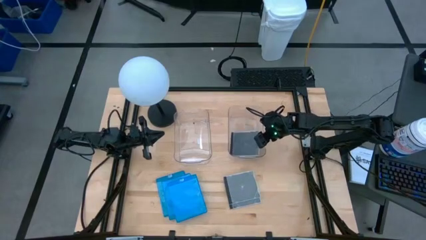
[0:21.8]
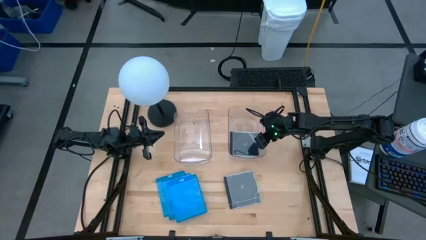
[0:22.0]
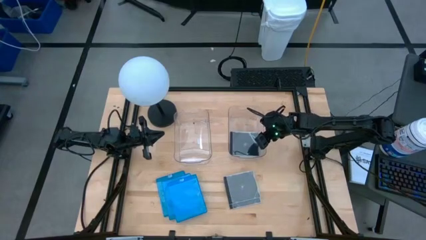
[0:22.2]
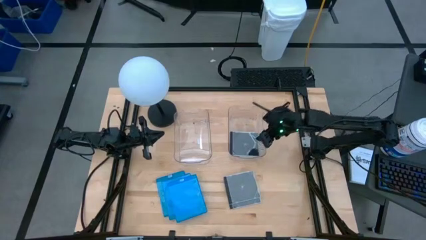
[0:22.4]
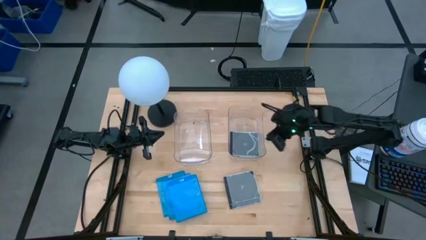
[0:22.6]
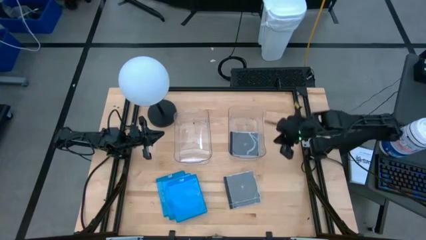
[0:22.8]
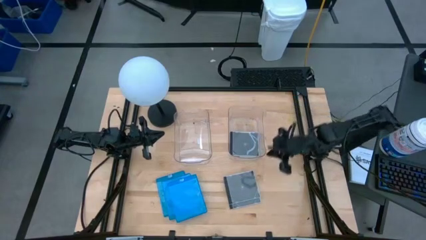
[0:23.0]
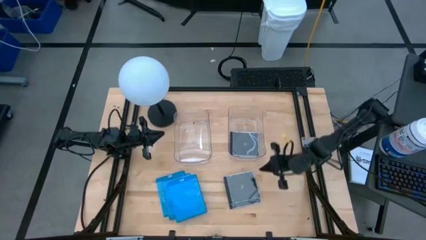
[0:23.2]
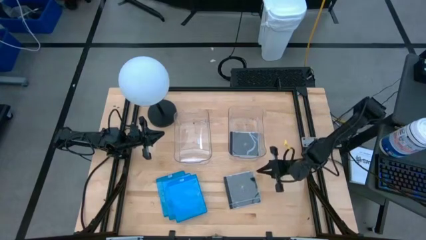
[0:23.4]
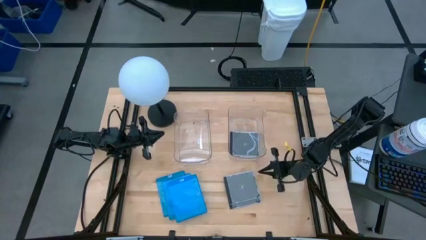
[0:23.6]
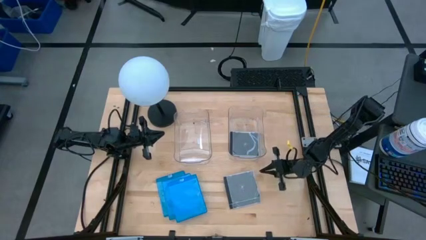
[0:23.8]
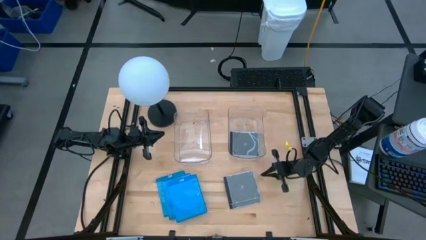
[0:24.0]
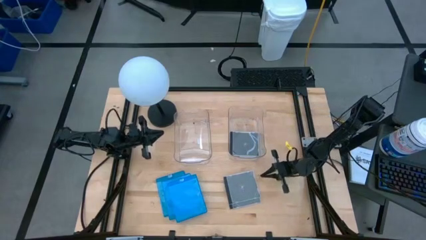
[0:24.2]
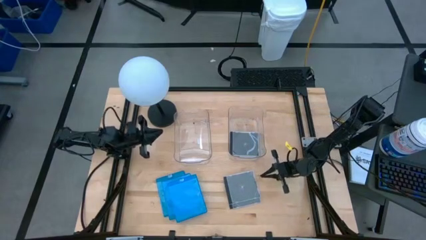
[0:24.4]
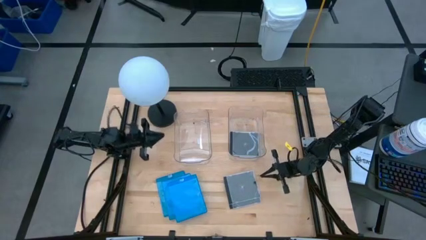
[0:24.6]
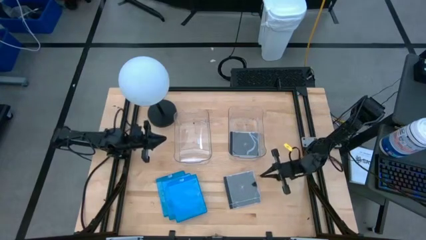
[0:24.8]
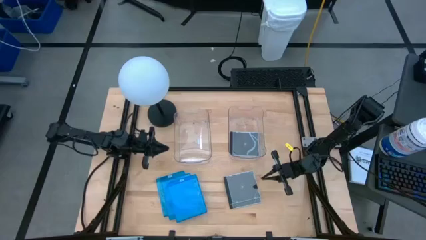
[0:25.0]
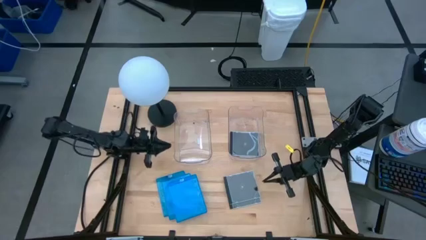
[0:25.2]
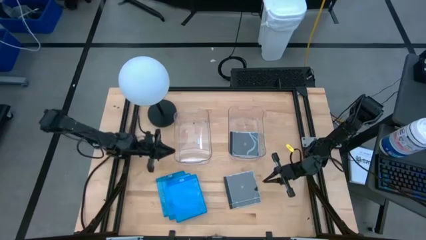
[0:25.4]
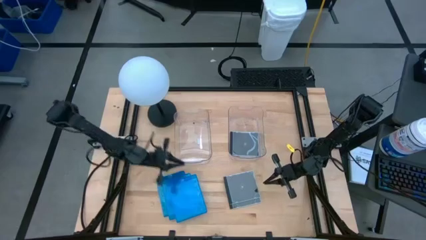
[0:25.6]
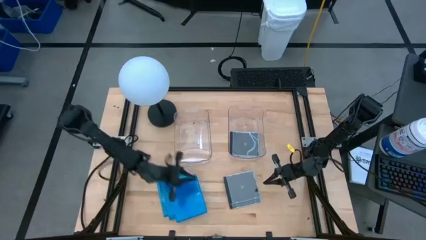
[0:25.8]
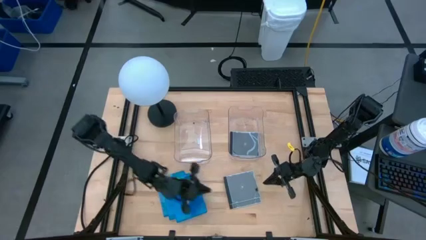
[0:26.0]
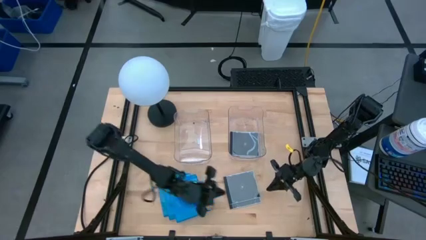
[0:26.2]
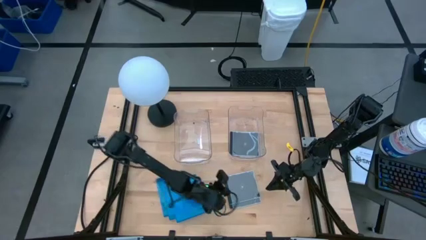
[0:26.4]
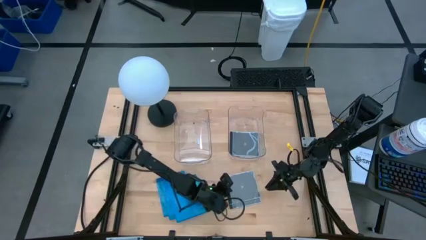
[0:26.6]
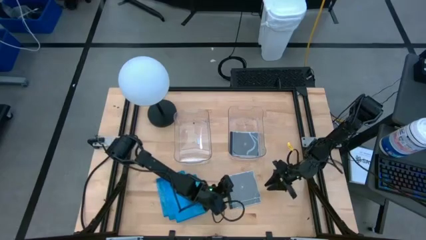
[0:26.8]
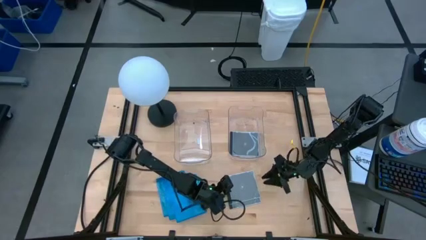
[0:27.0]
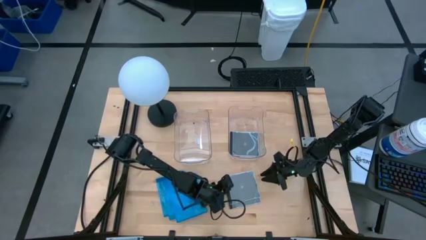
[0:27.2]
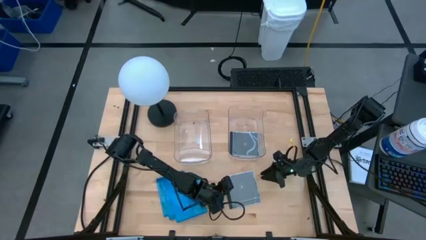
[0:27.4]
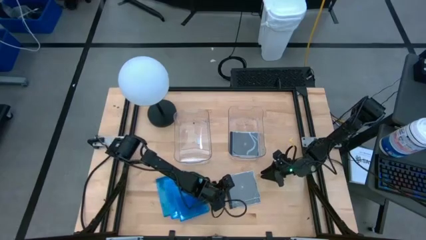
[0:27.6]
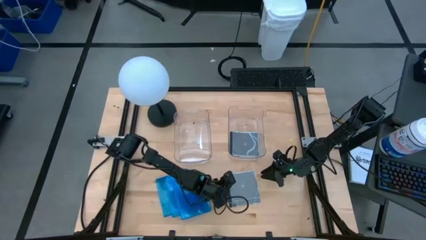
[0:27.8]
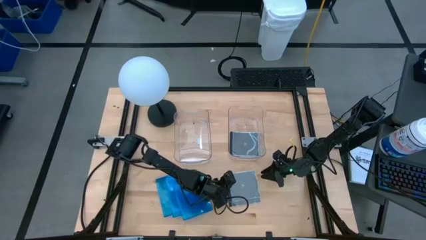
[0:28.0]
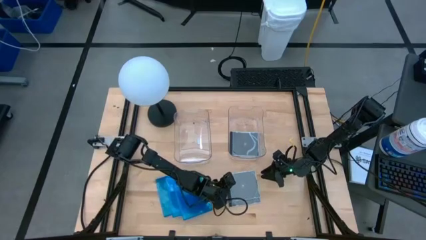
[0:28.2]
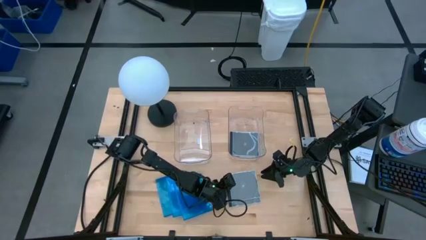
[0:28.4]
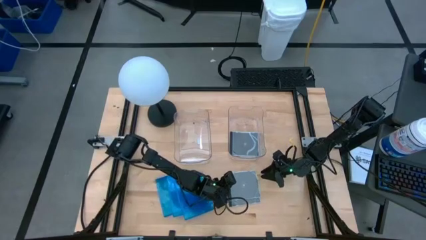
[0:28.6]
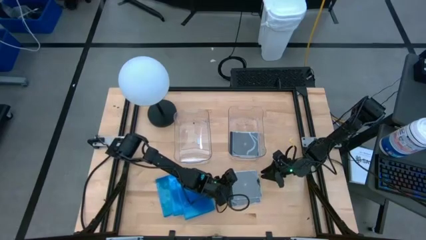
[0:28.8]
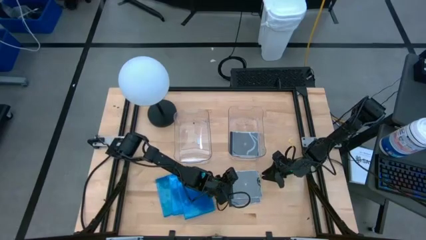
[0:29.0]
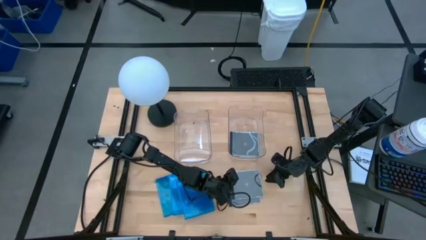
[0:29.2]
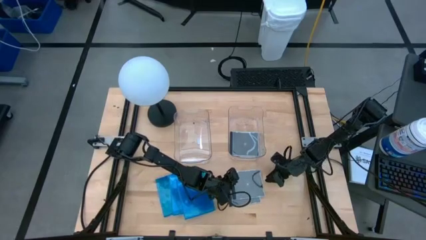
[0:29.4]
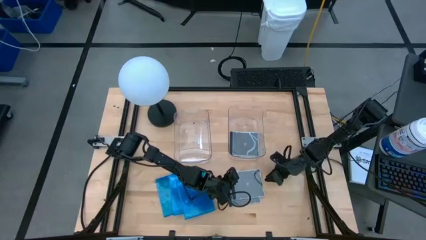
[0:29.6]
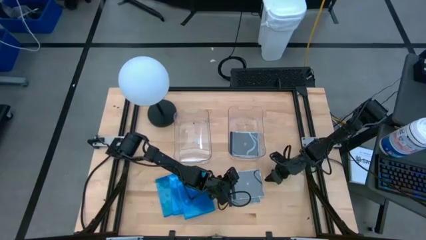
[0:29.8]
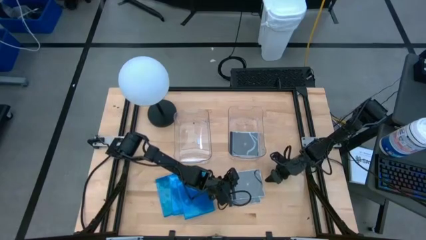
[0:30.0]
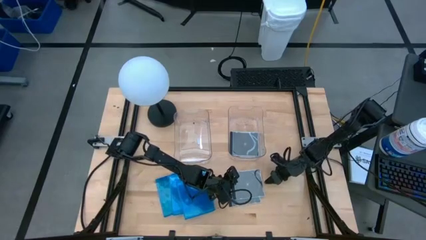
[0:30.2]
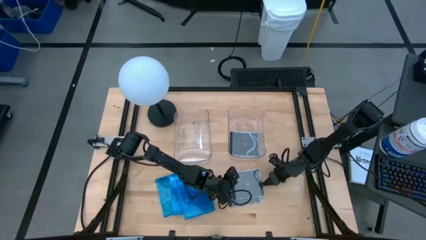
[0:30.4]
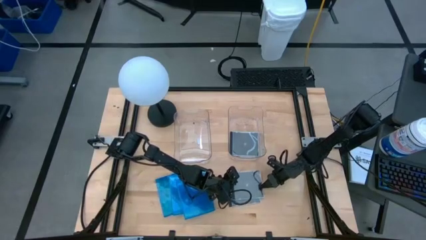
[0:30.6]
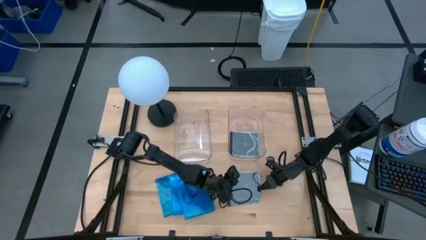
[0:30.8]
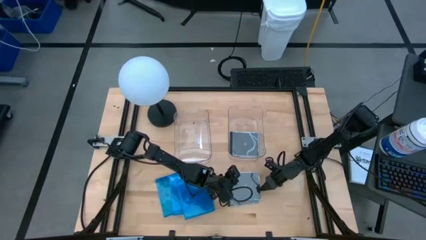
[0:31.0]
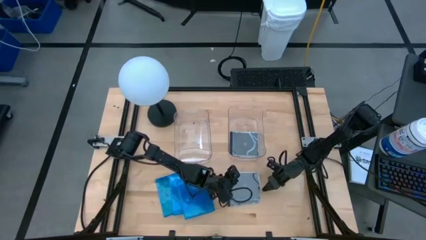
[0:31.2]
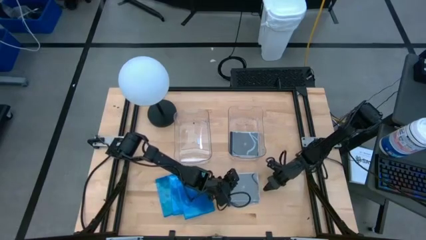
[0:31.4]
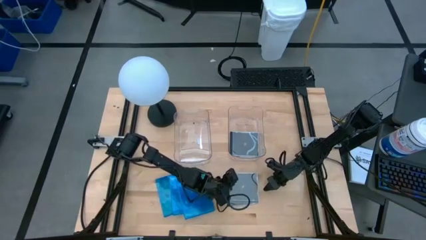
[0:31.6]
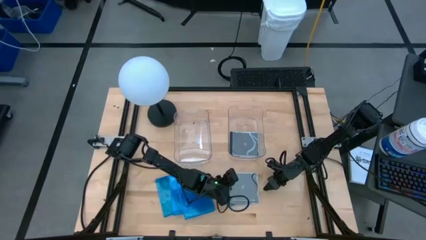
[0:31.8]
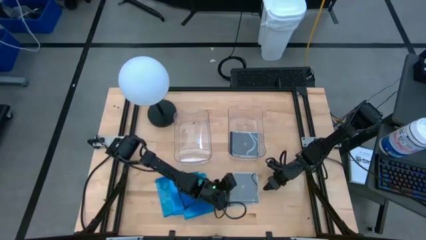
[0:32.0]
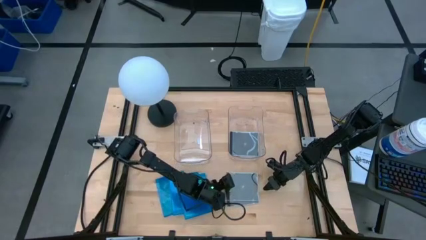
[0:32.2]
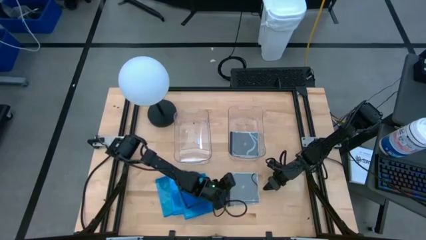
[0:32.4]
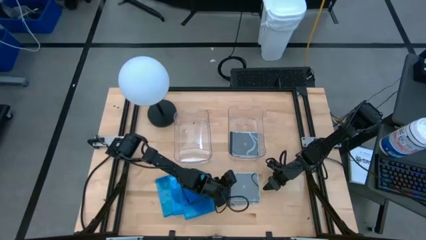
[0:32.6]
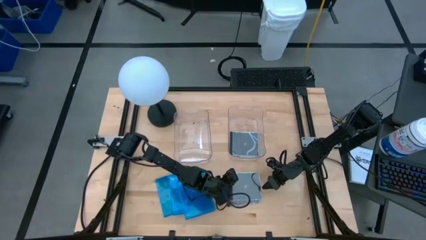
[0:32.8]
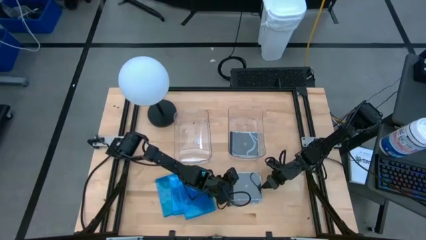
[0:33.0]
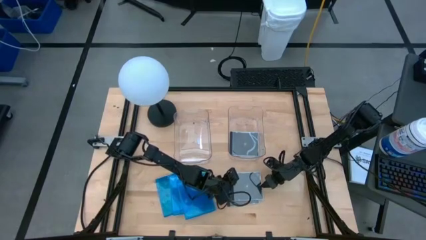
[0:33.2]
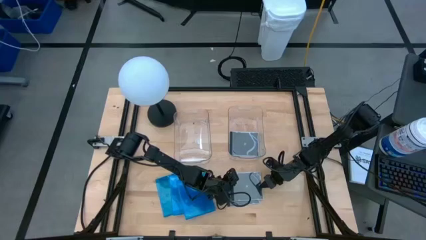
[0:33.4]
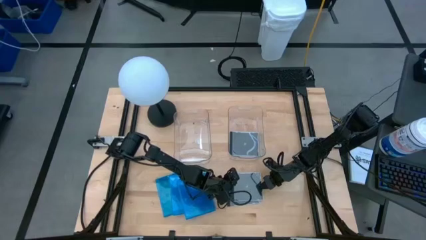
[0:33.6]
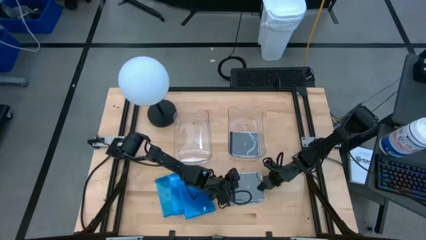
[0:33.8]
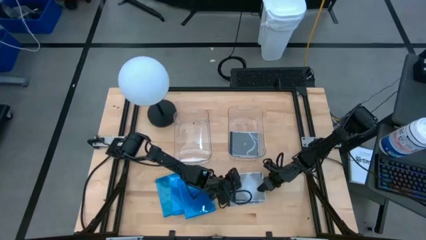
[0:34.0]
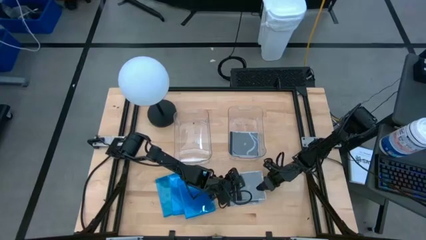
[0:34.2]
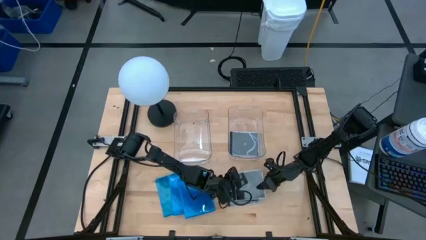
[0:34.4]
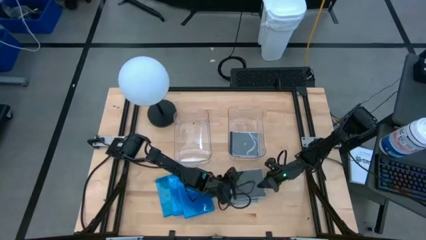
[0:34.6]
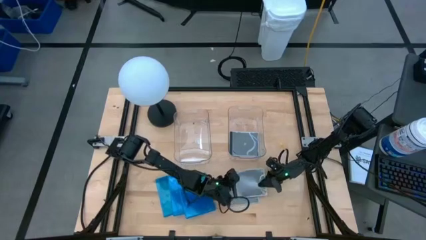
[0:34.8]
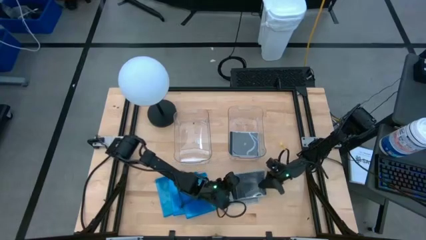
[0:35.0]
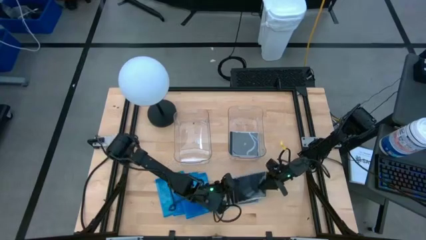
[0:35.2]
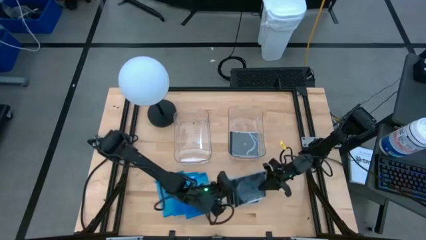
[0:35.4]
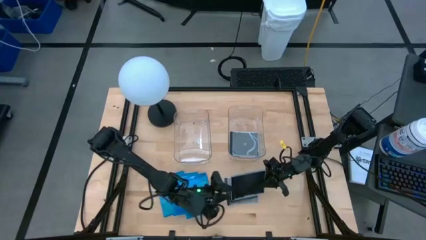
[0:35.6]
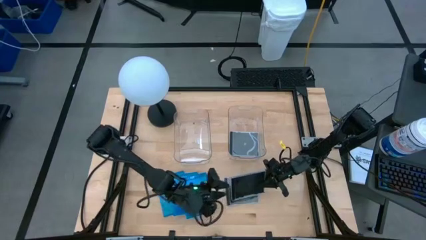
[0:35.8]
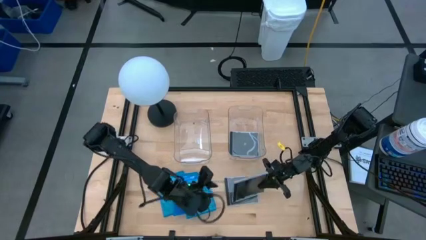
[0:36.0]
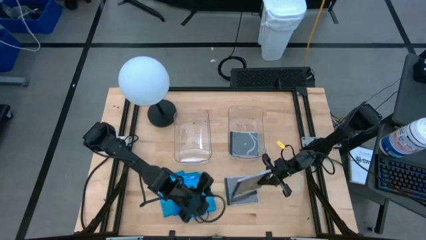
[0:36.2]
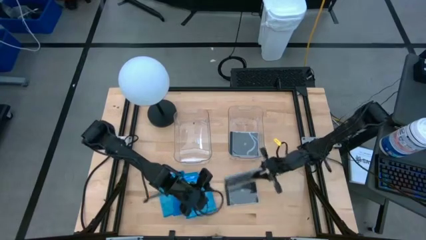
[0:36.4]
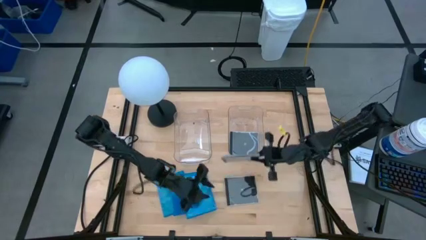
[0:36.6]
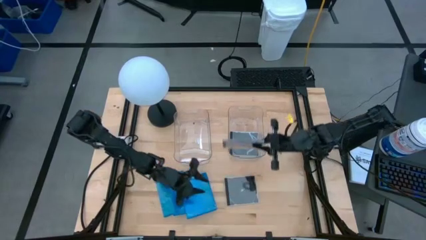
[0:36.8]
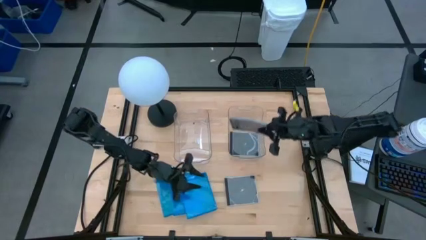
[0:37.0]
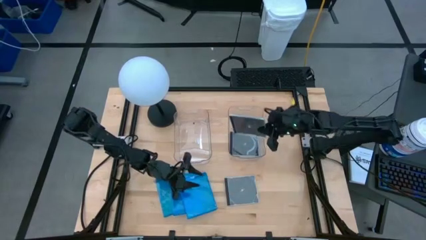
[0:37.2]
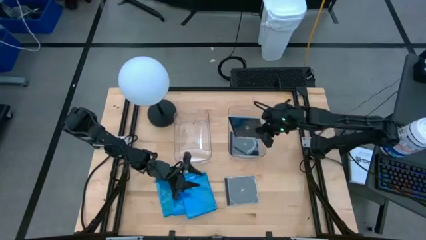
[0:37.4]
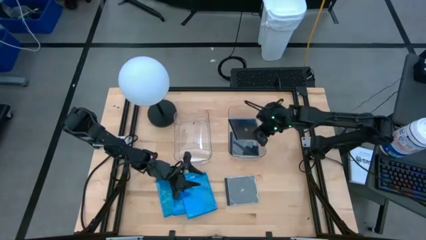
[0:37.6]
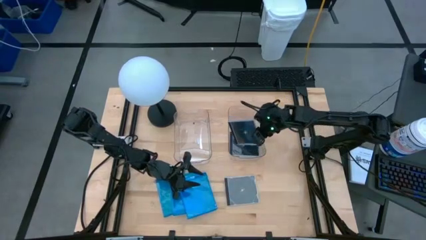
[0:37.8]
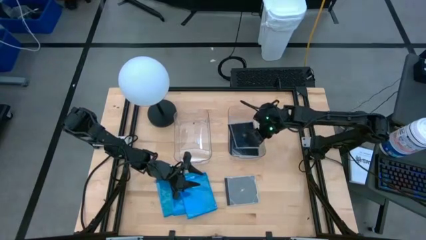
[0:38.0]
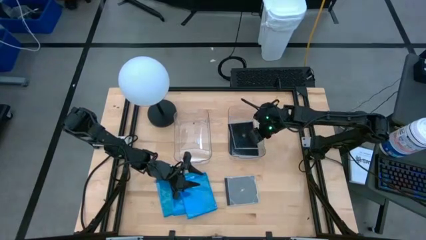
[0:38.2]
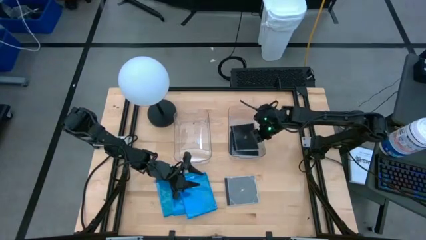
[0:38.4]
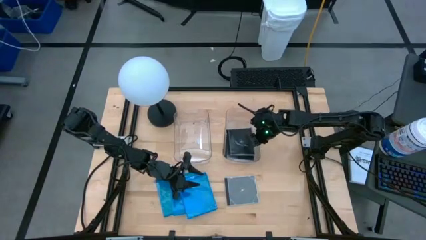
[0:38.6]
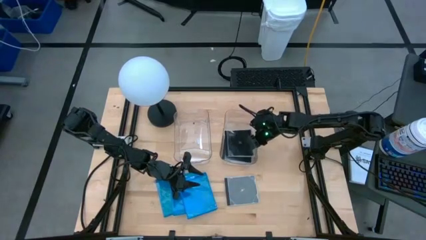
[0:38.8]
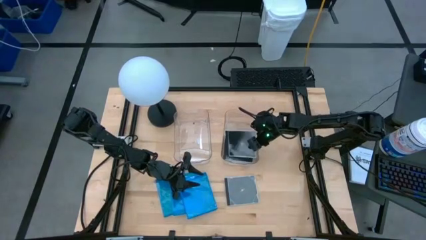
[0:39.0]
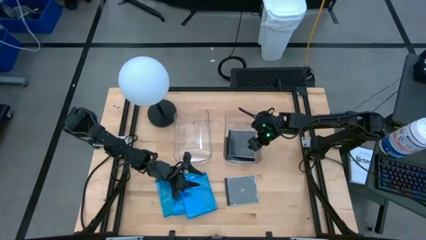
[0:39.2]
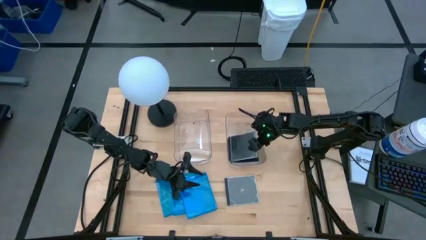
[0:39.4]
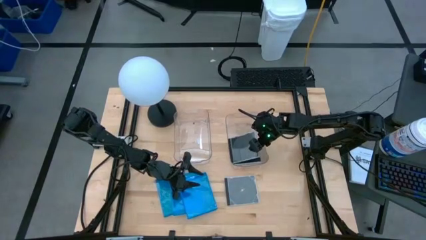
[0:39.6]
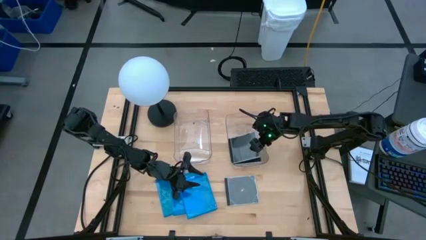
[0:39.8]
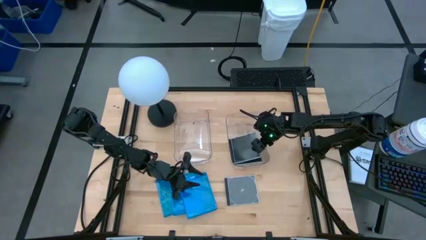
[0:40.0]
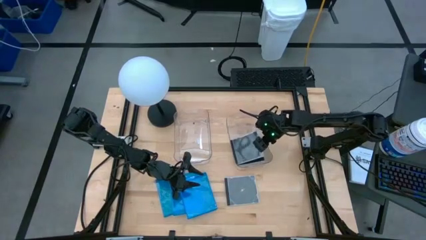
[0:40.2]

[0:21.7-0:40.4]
Task: Pick & place jewel cases by type
Put the black CD case into the right transparent bin
